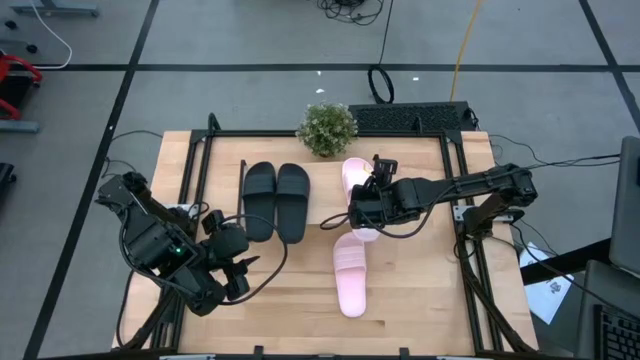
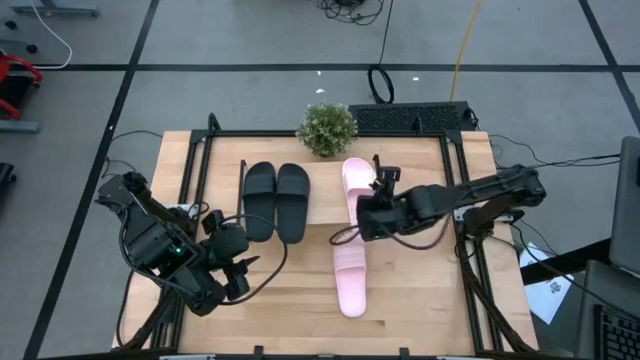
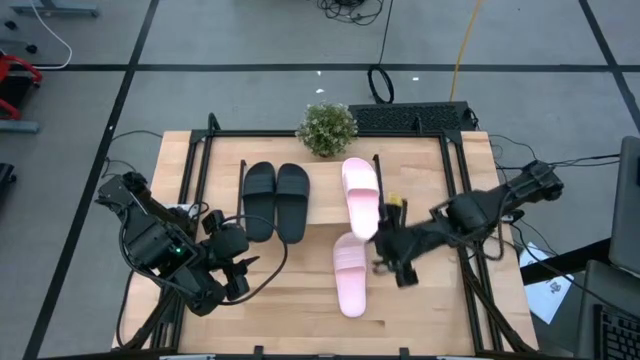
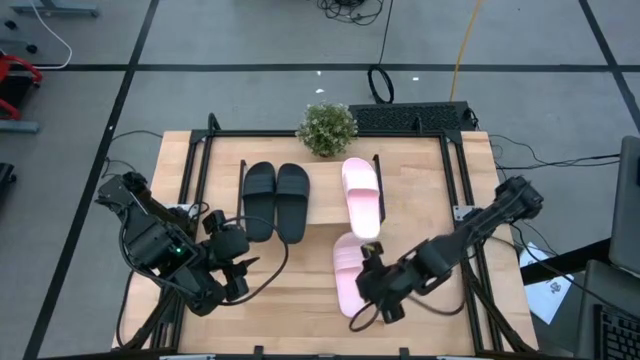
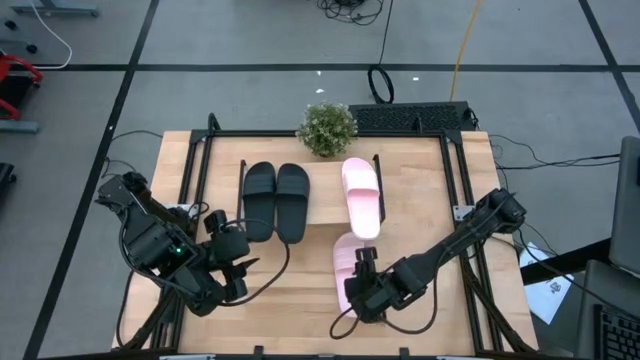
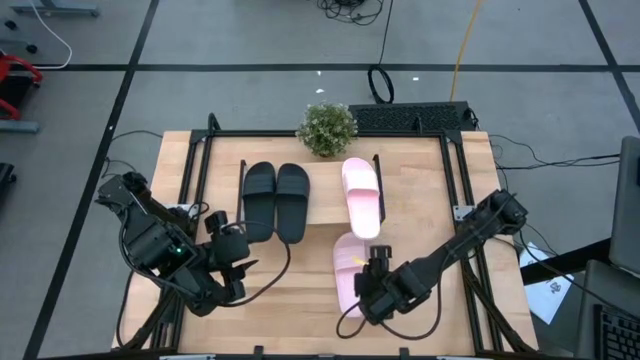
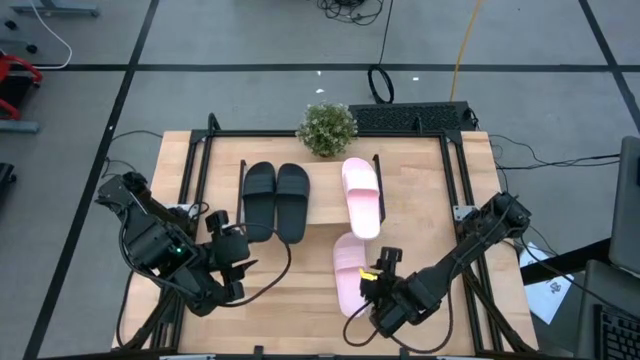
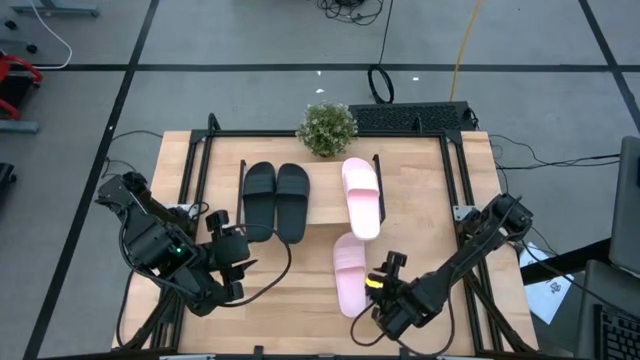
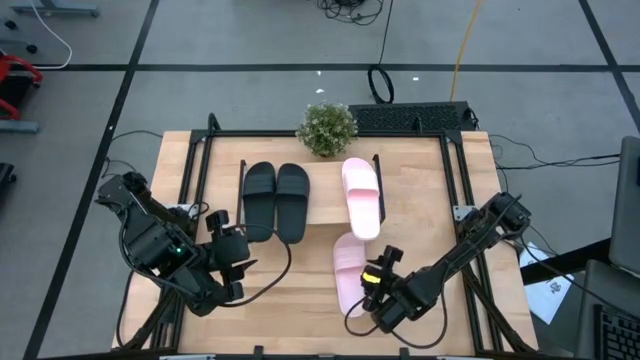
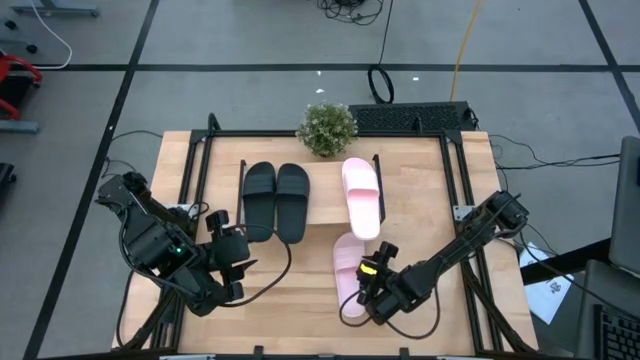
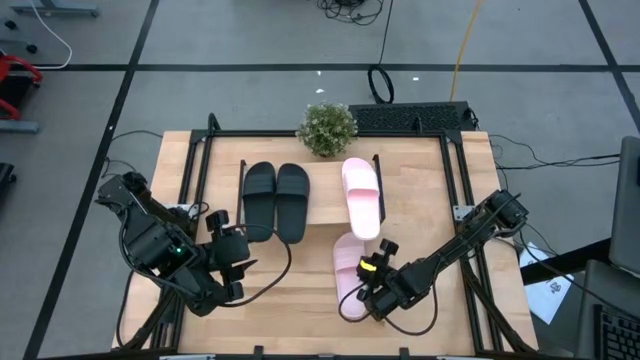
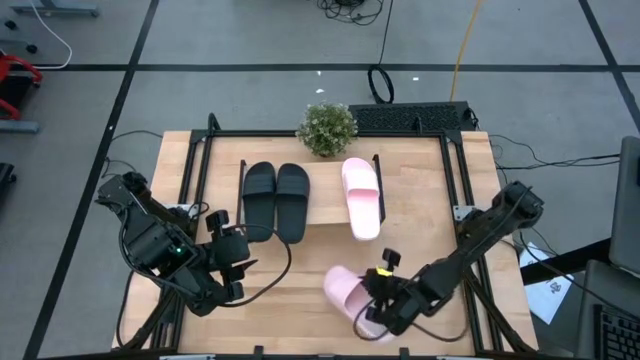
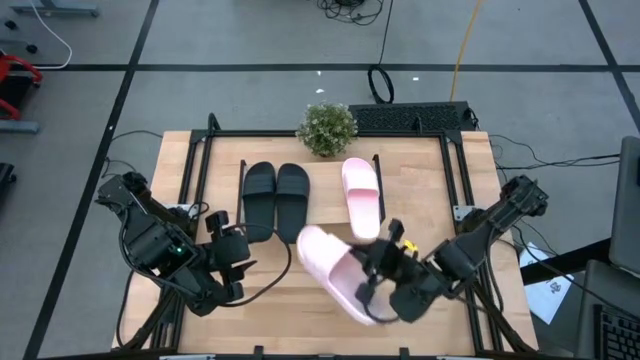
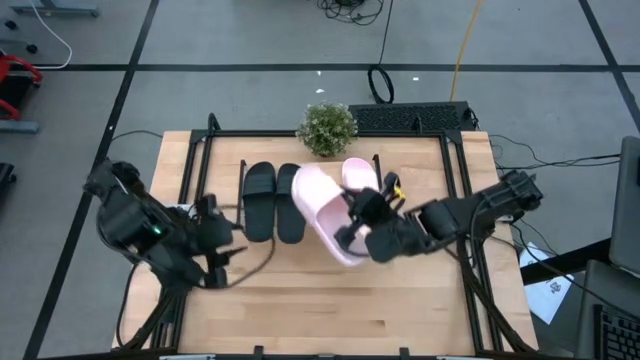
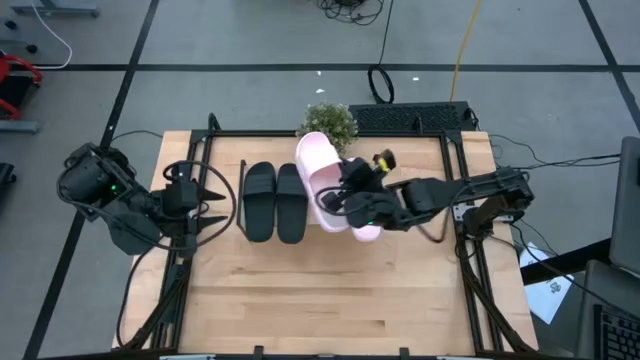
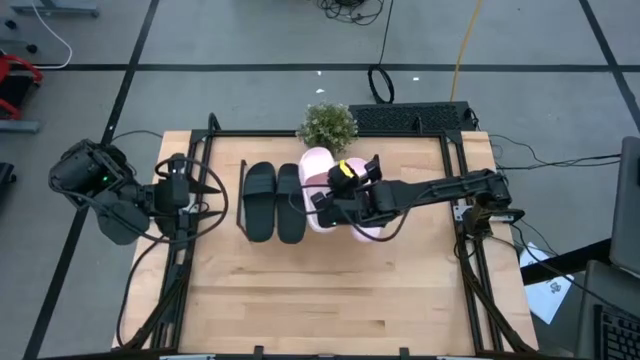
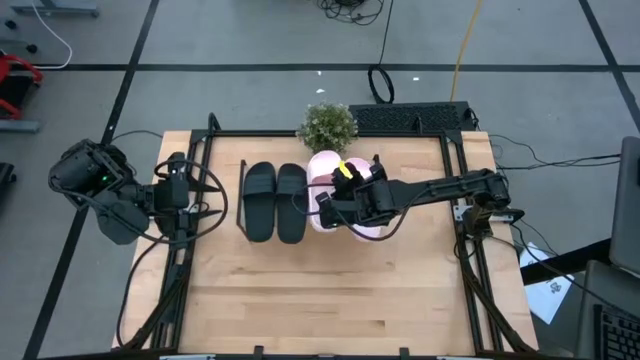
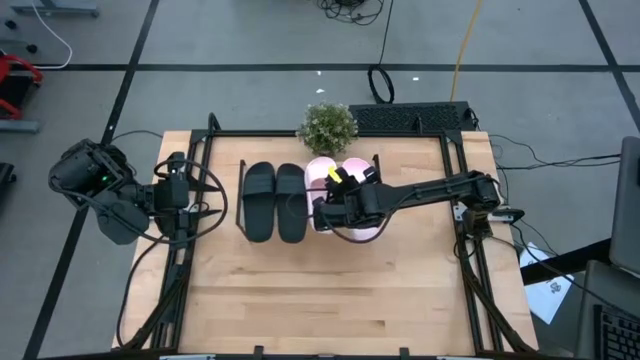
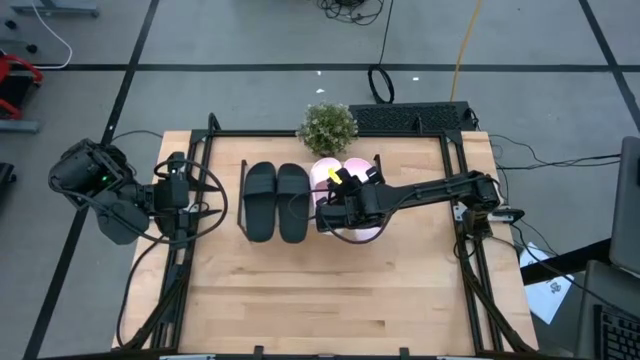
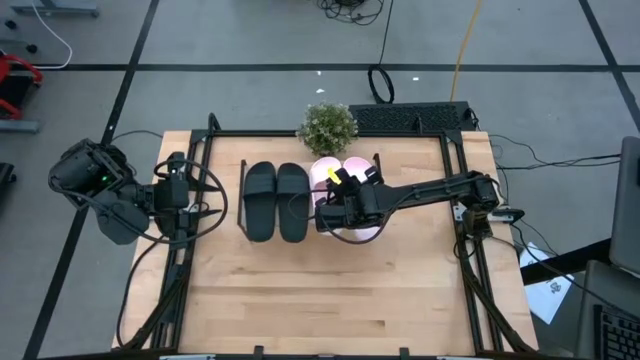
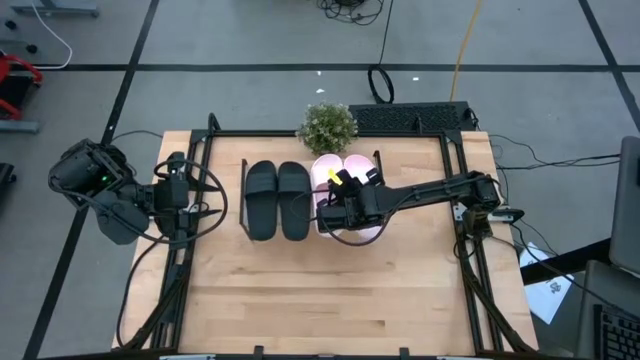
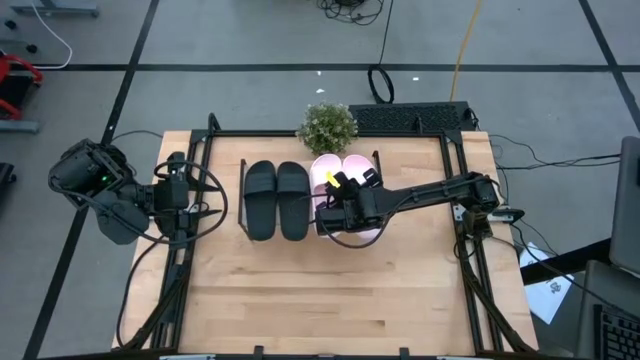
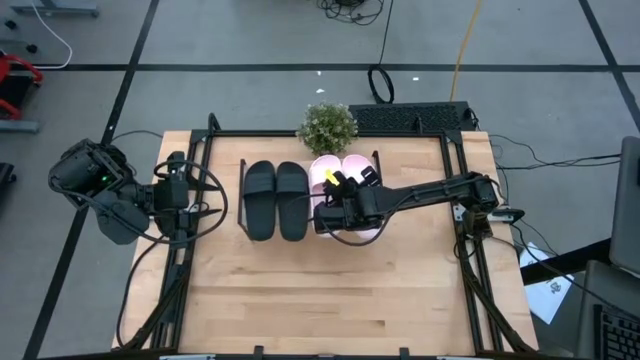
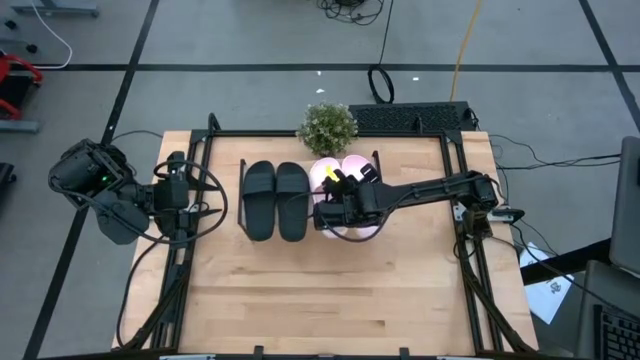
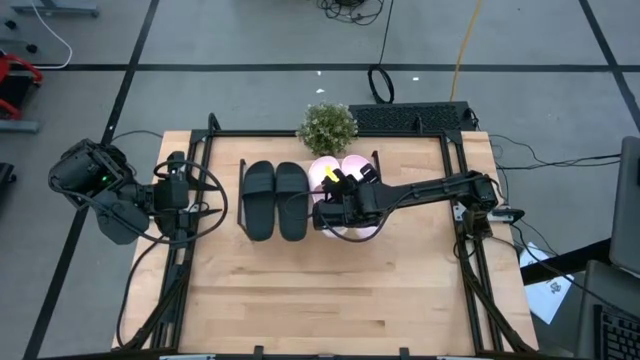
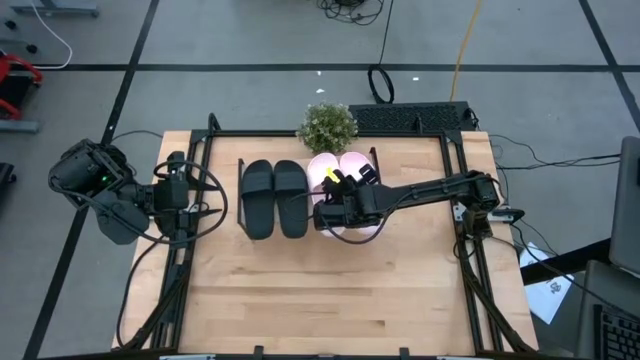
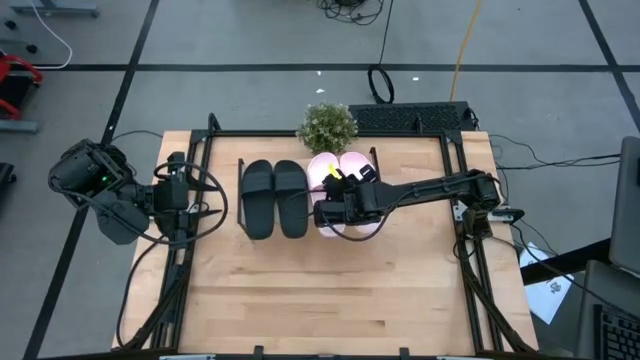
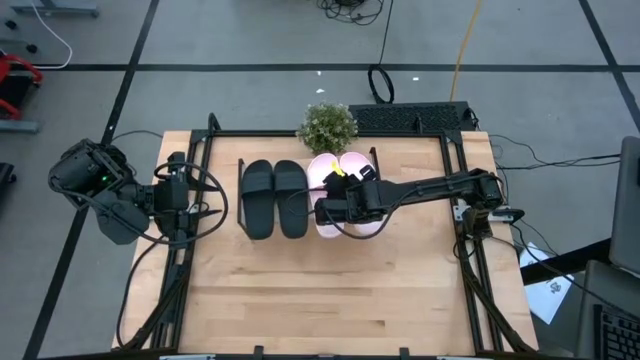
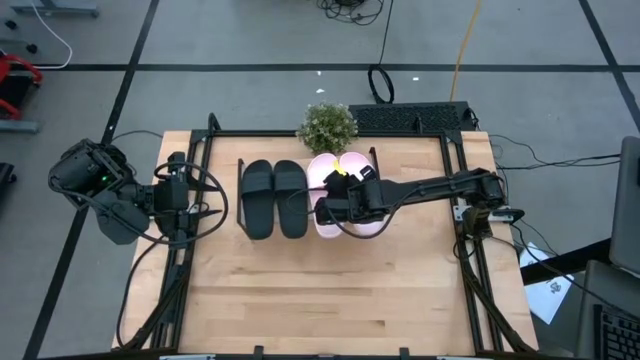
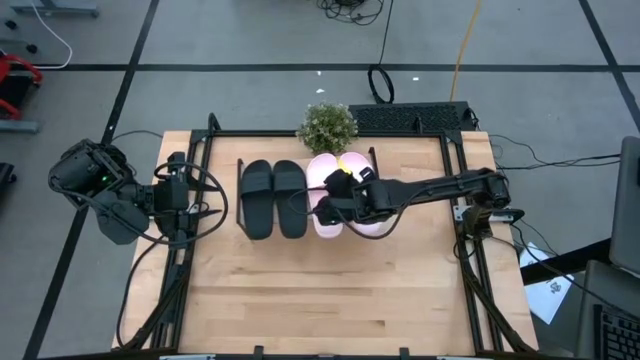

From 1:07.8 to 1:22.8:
Task: Pick and place slides into the shelf
Put the pink slider on the shelf

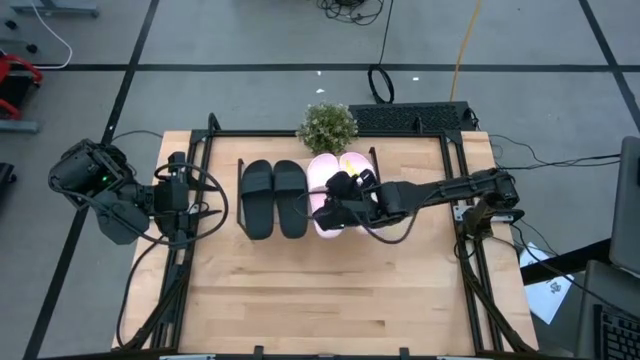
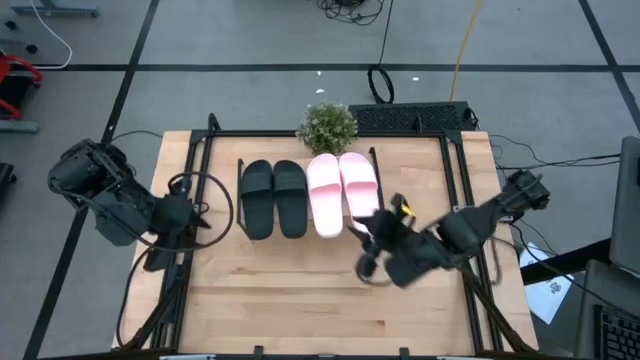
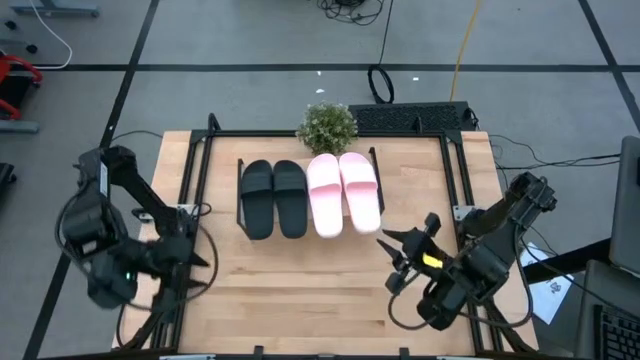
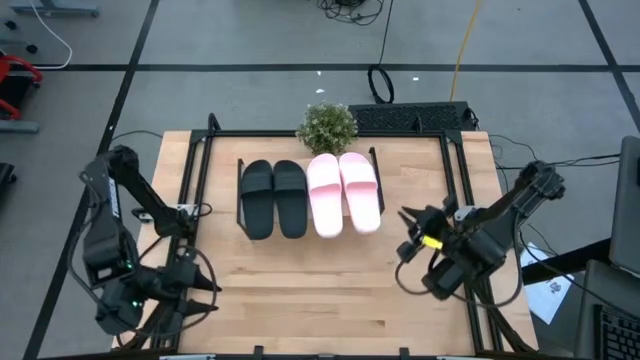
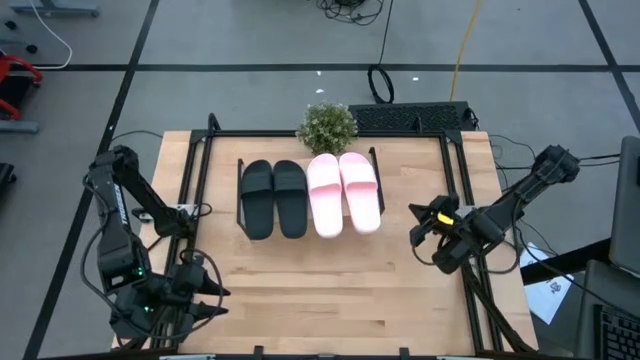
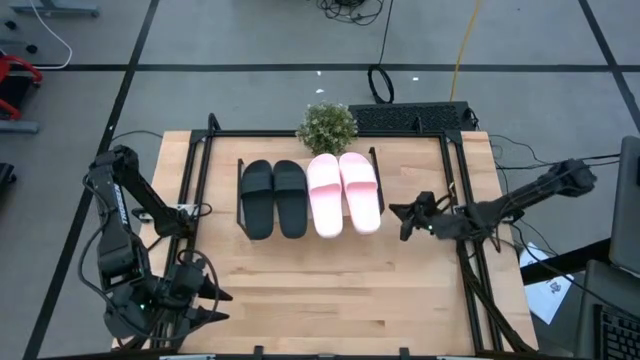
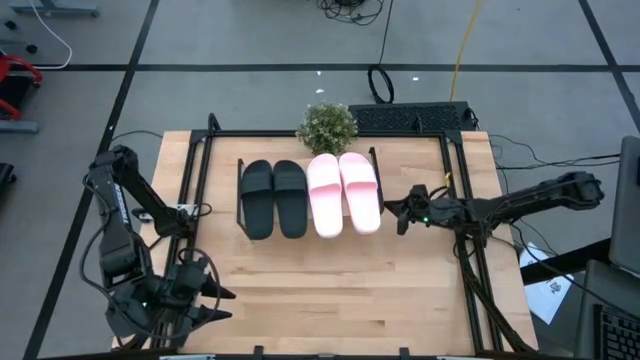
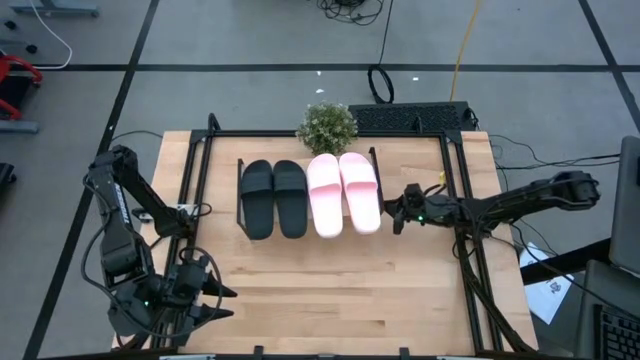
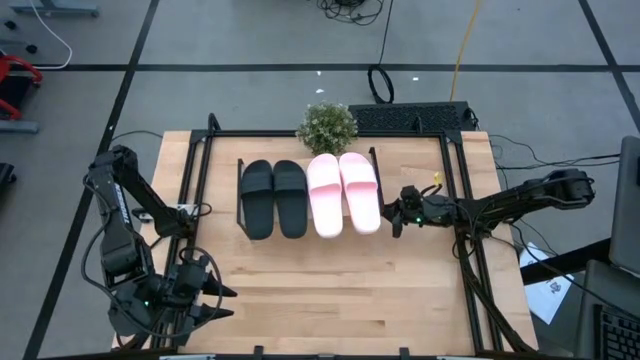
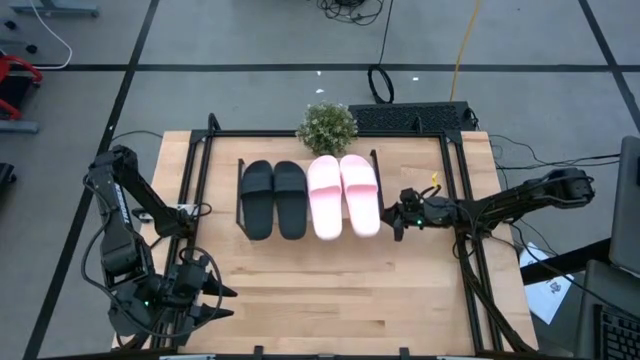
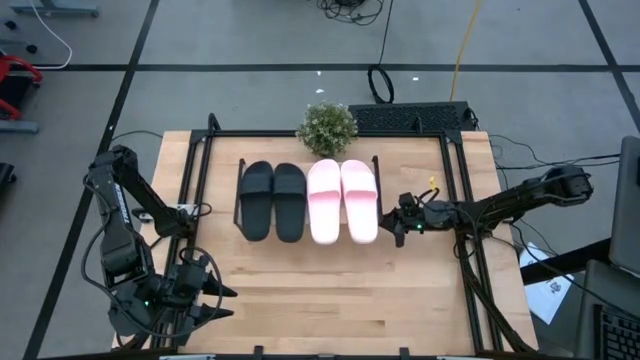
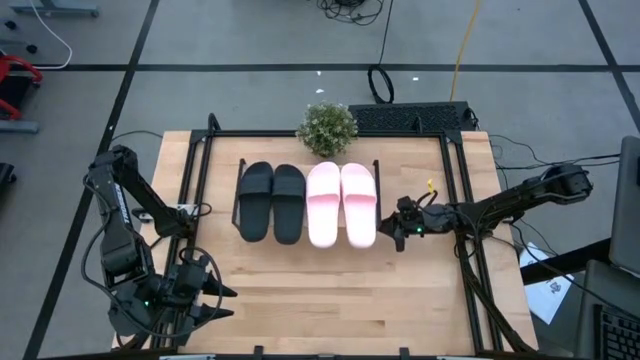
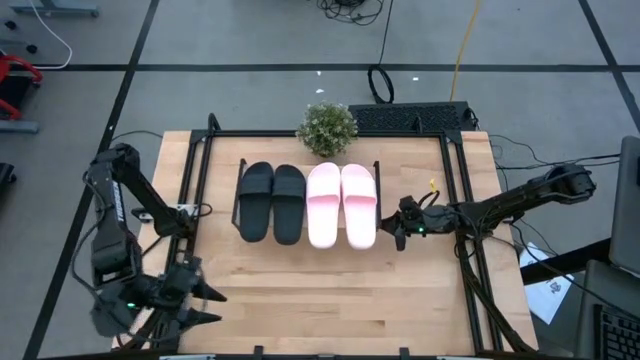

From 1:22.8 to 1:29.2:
Adjust the shelf
